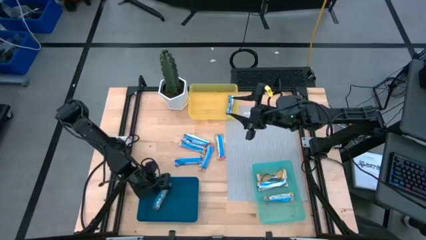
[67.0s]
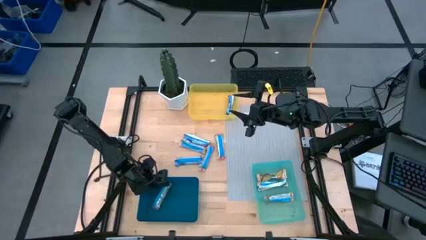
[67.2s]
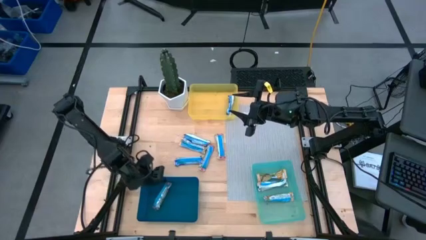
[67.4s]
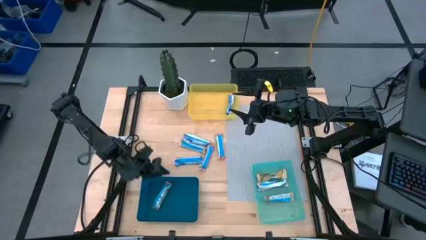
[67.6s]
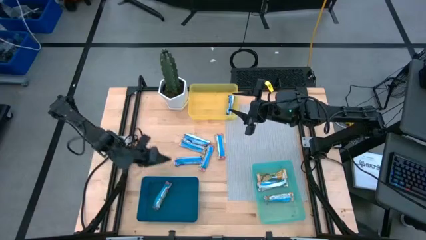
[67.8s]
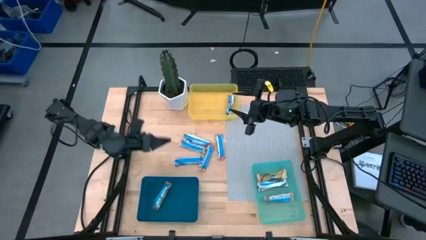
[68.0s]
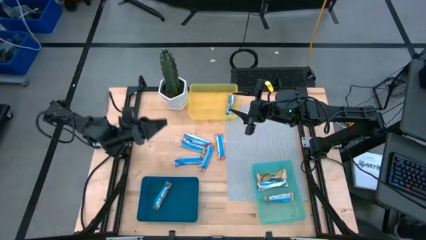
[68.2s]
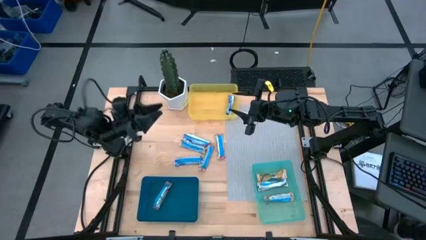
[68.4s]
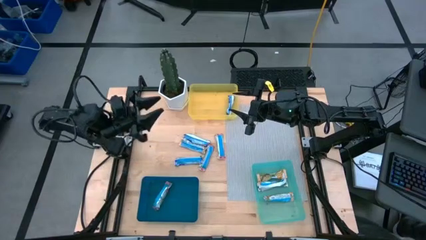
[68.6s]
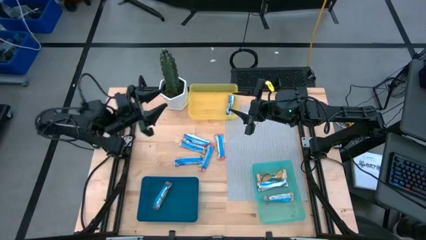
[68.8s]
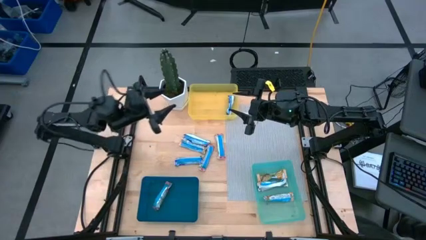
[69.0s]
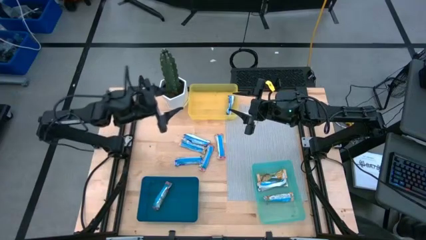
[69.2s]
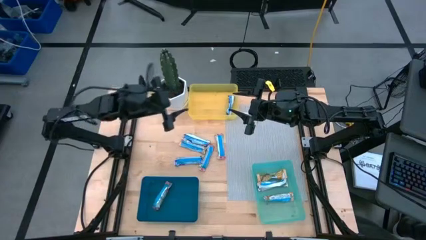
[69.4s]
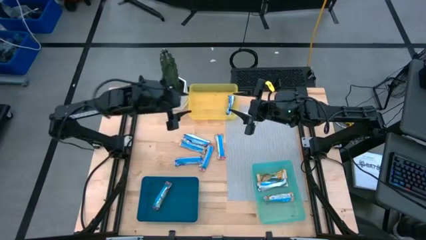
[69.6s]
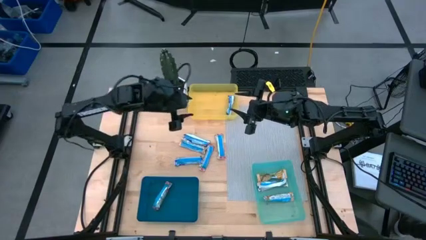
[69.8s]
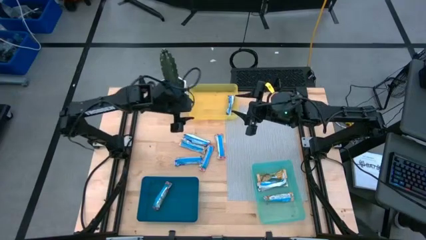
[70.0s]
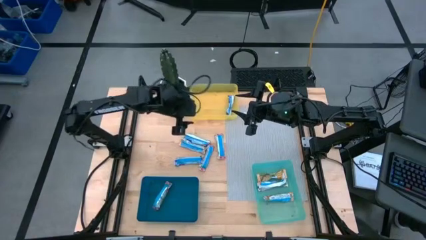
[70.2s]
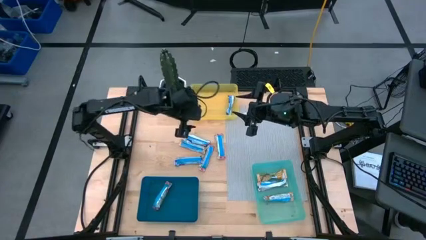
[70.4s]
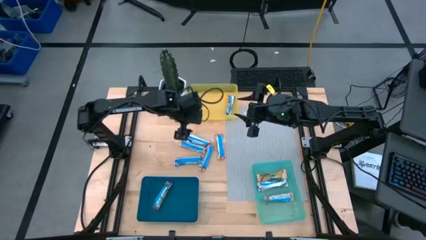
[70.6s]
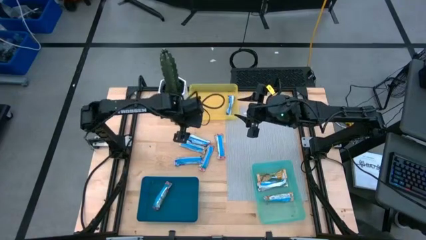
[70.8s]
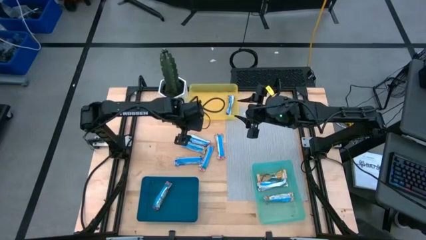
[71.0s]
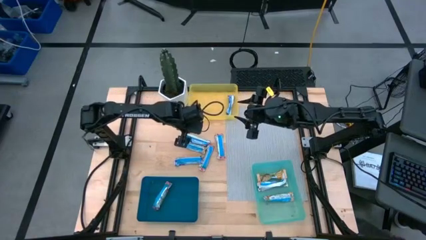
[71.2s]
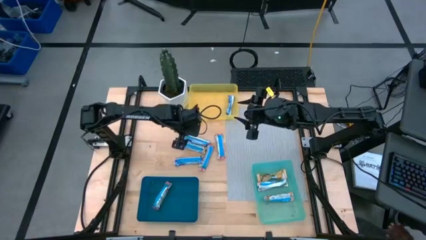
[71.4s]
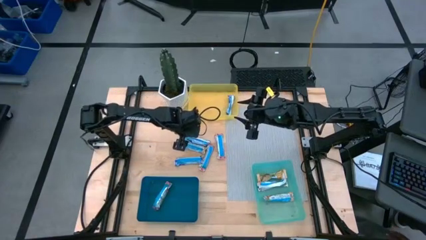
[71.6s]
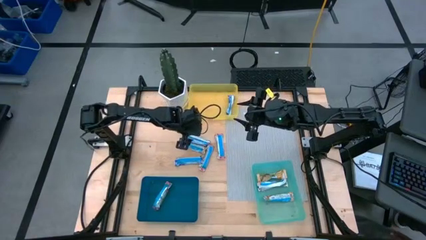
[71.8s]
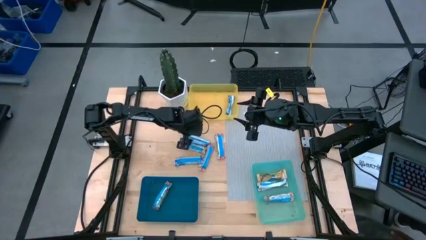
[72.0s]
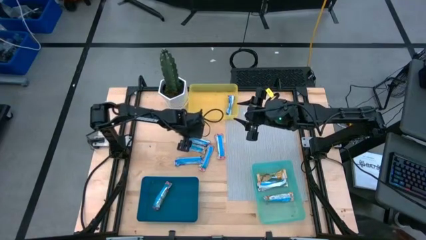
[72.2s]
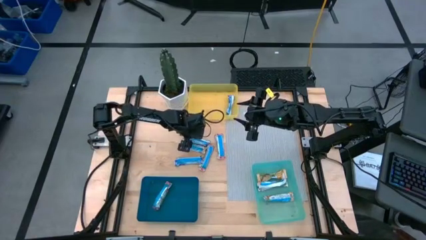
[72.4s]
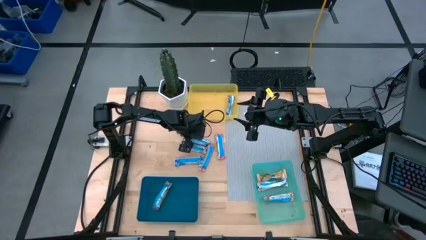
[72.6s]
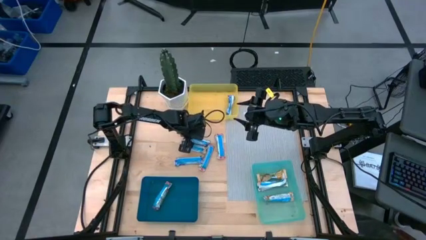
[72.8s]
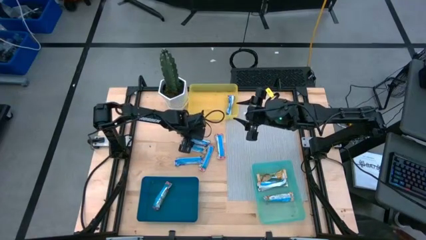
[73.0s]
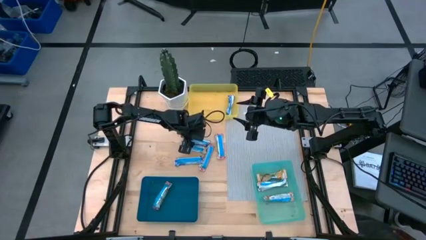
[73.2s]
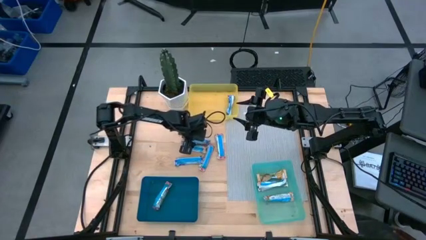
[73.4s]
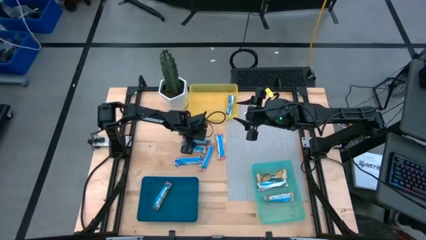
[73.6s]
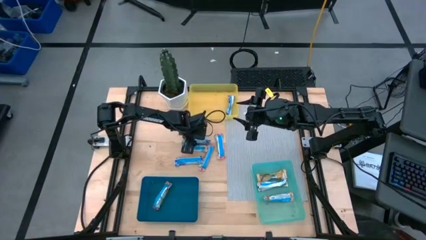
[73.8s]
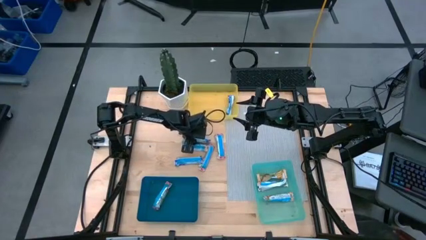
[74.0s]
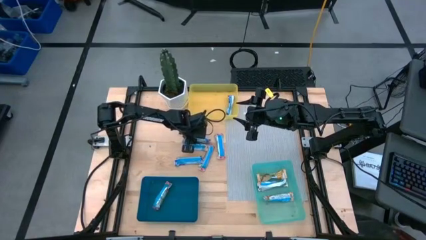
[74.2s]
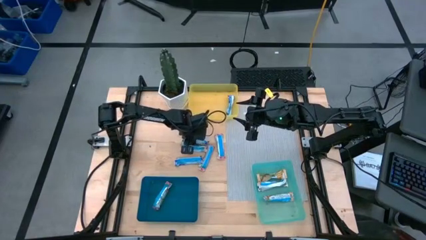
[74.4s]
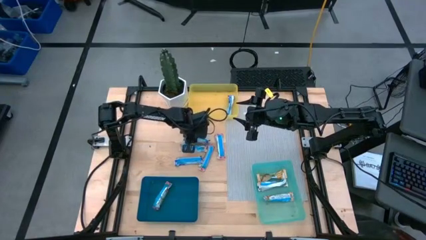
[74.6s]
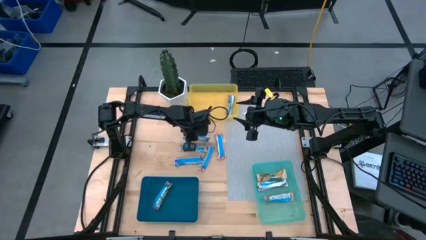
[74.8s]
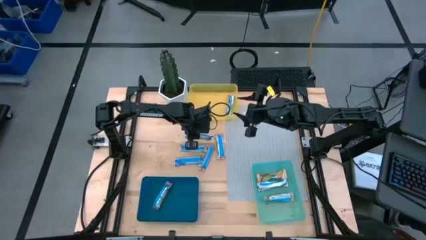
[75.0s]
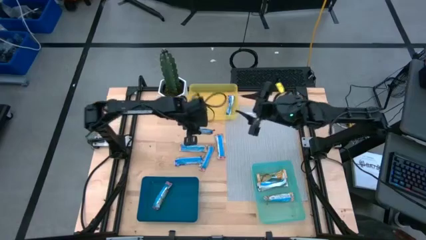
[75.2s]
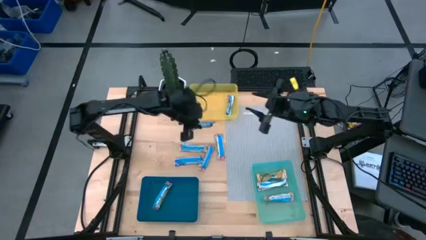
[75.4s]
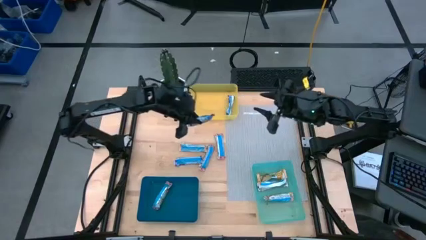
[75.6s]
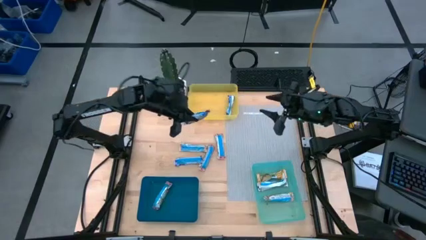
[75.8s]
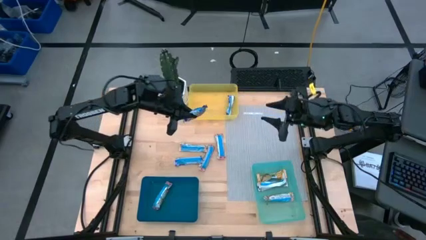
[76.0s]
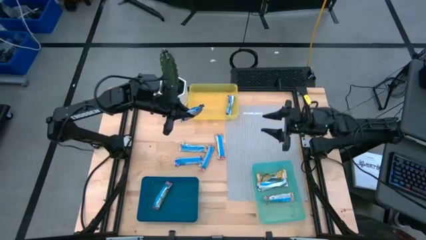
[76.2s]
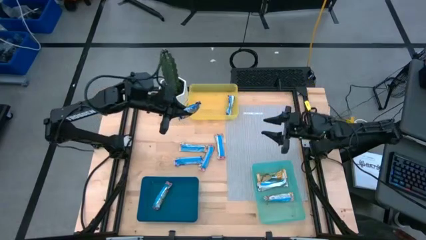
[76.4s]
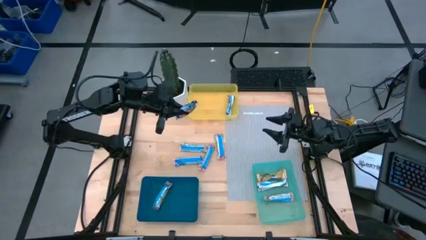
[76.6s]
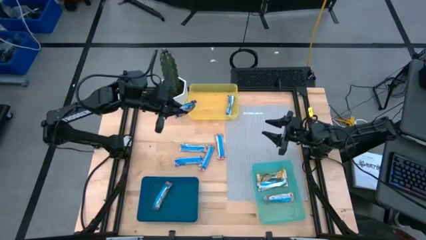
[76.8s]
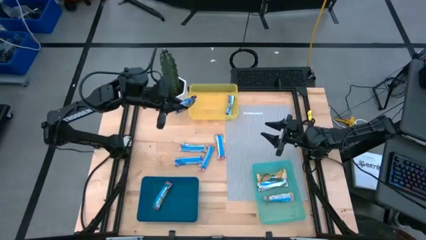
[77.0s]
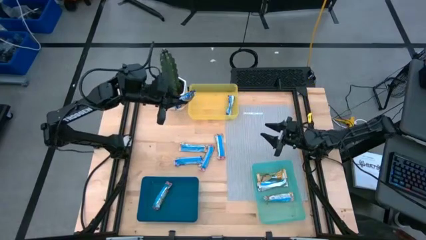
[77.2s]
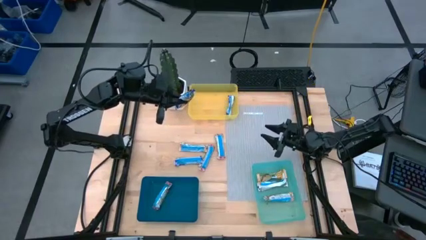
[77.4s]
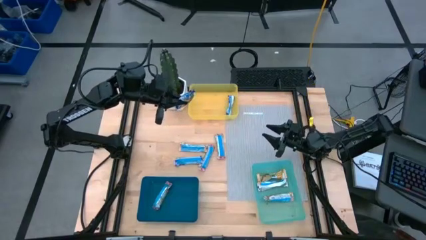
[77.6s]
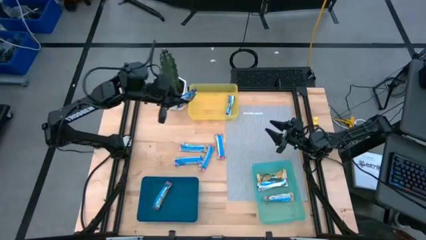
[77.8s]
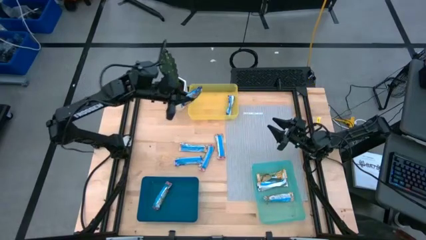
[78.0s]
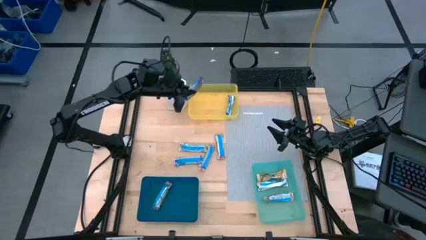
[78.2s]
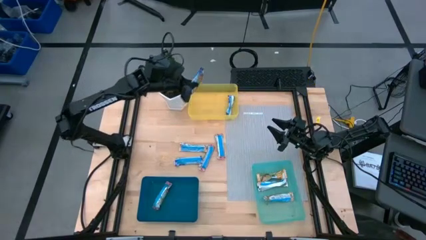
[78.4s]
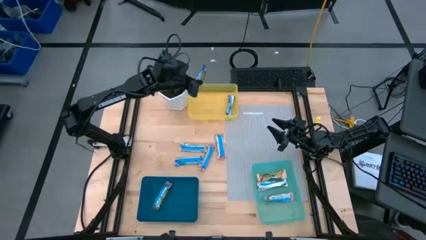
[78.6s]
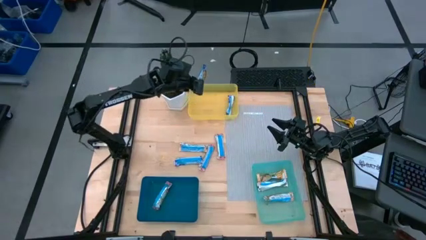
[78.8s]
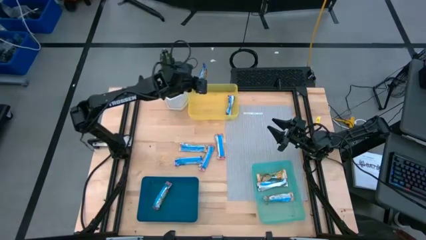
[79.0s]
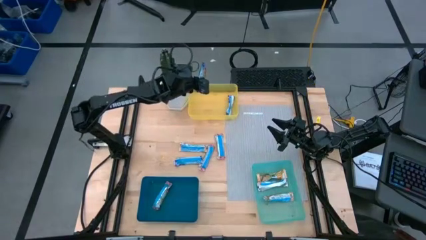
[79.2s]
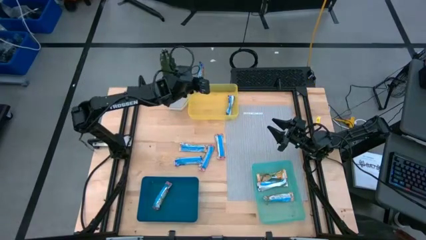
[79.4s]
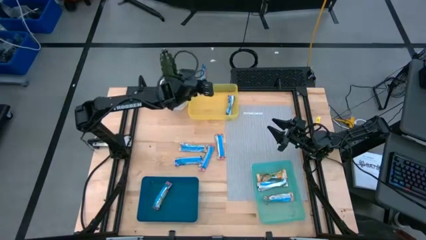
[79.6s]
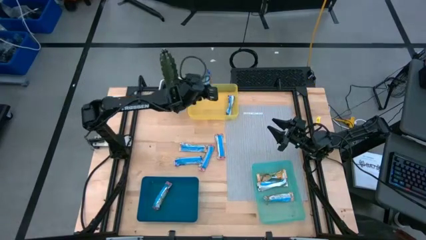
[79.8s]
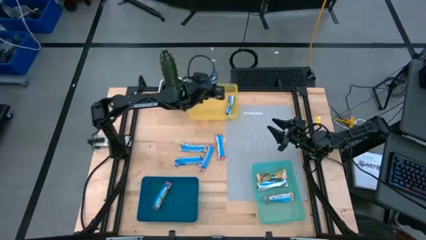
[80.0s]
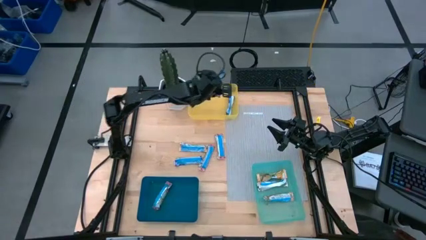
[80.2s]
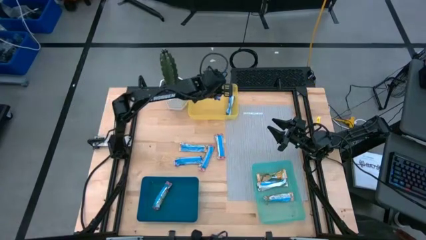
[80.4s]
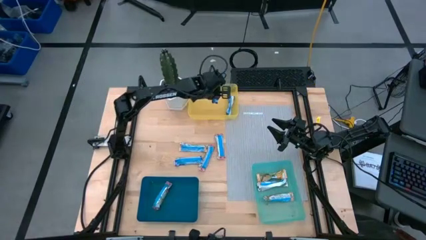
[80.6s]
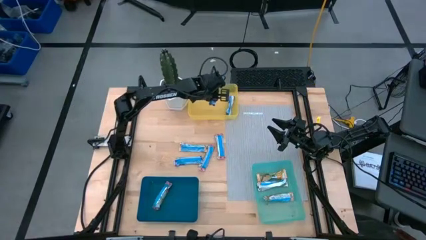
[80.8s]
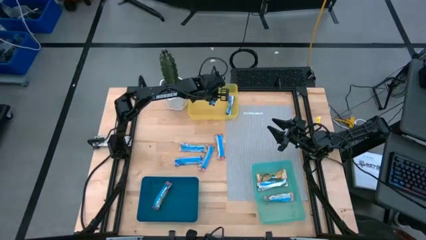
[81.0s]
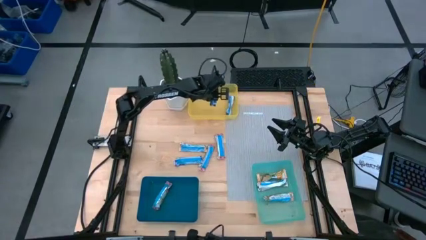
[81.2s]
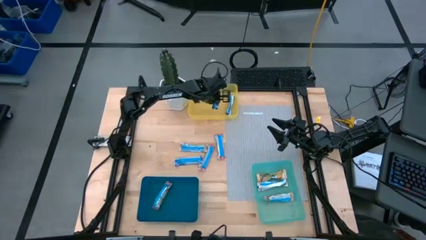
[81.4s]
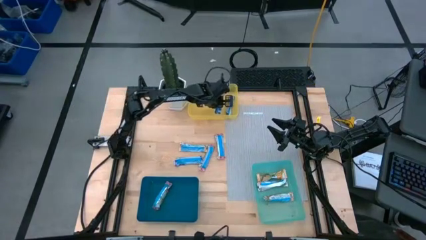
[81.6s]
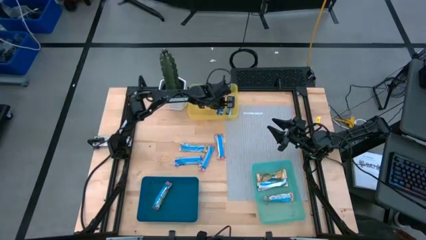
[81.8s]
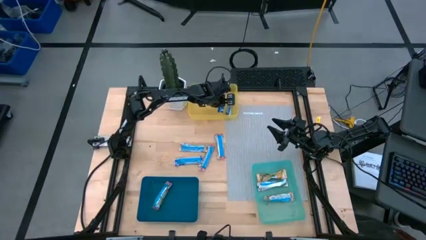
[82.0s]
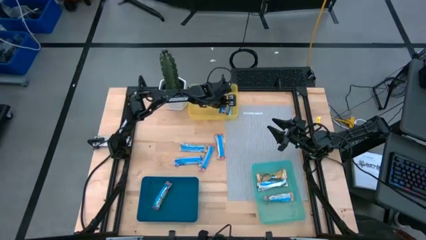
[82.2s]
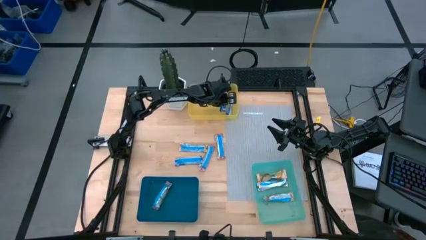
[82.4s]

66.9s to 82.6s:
Task: Pick and place Granola Bars by type
Put the blue granola bar into the yellow bin
